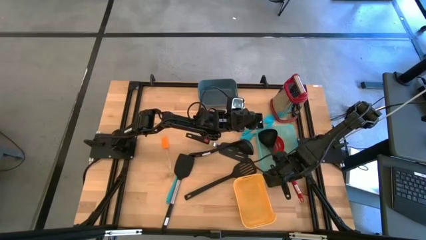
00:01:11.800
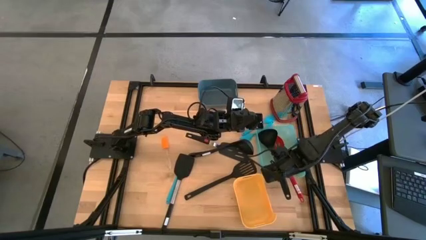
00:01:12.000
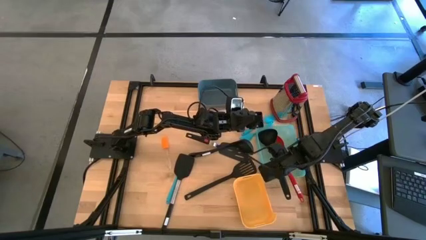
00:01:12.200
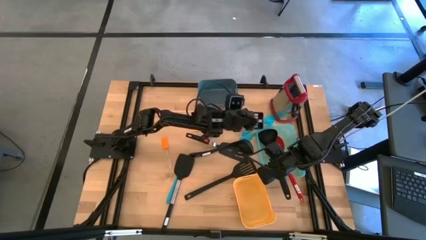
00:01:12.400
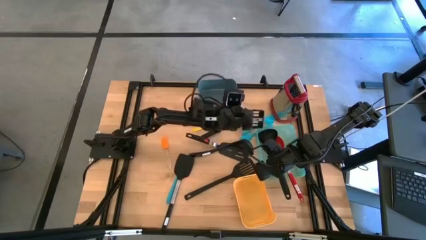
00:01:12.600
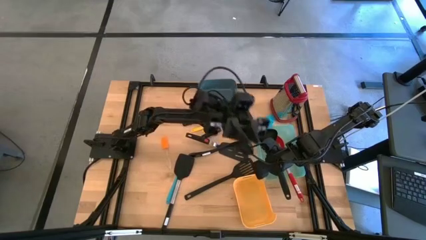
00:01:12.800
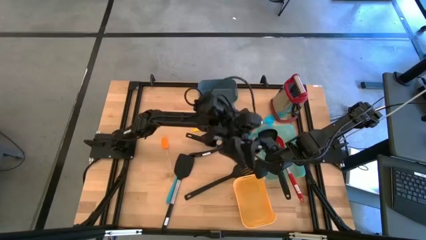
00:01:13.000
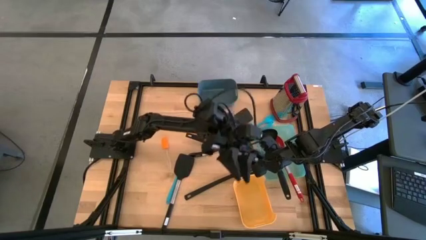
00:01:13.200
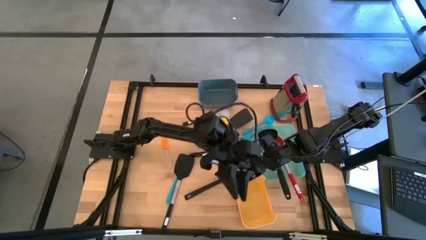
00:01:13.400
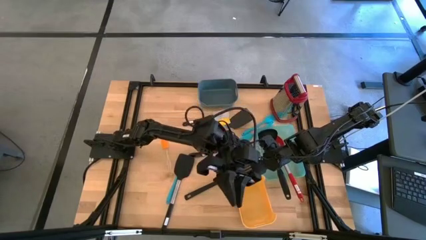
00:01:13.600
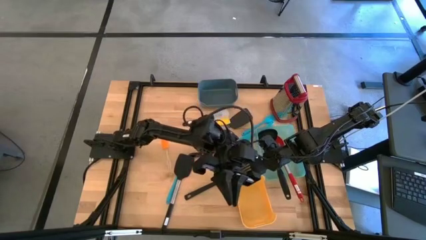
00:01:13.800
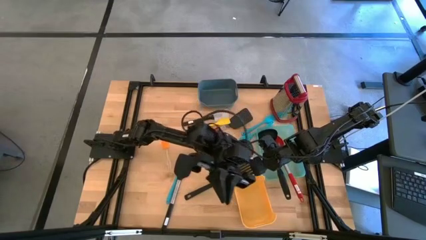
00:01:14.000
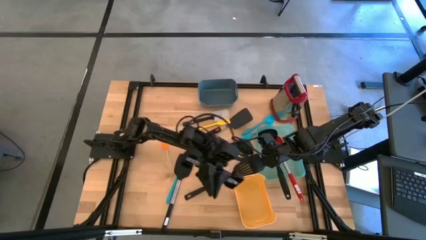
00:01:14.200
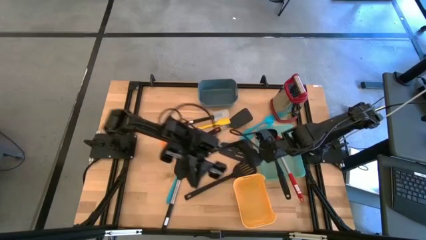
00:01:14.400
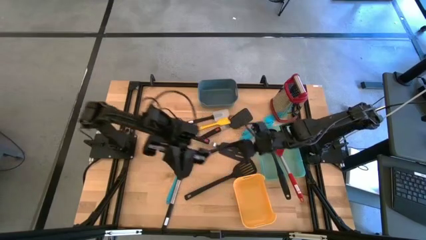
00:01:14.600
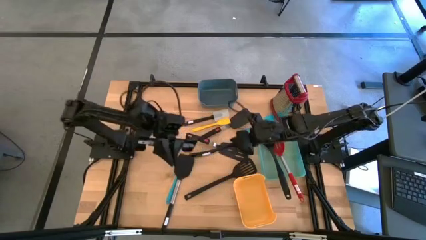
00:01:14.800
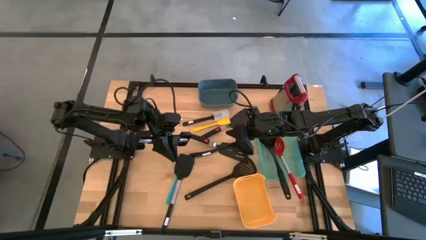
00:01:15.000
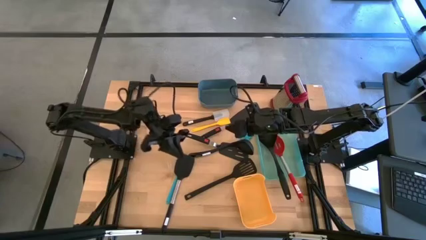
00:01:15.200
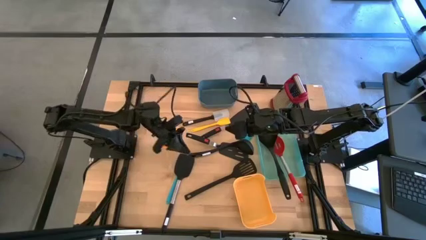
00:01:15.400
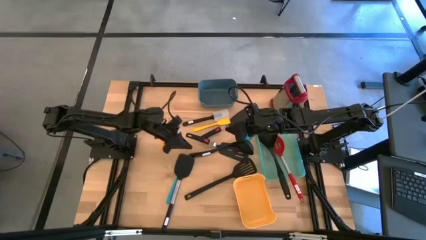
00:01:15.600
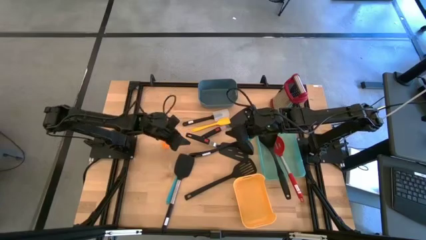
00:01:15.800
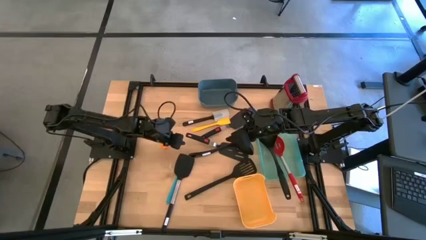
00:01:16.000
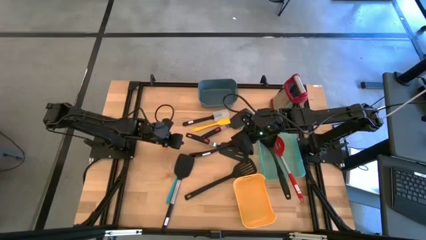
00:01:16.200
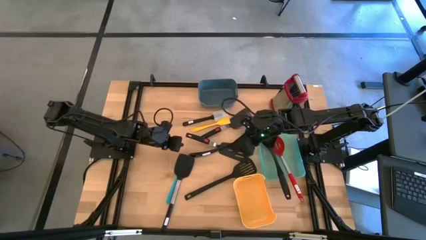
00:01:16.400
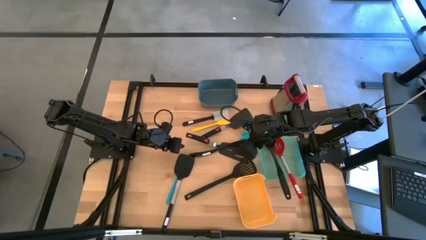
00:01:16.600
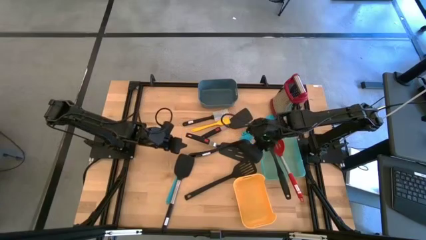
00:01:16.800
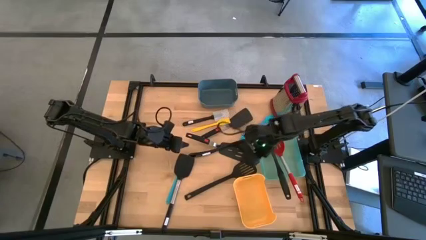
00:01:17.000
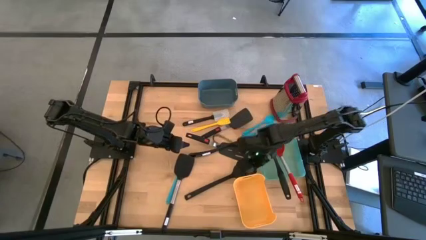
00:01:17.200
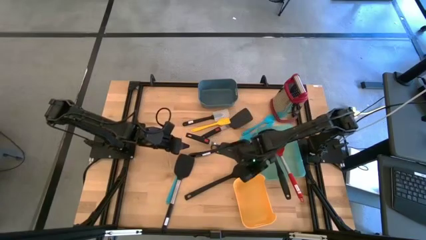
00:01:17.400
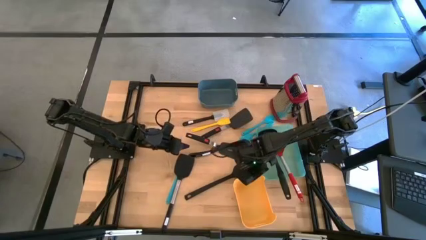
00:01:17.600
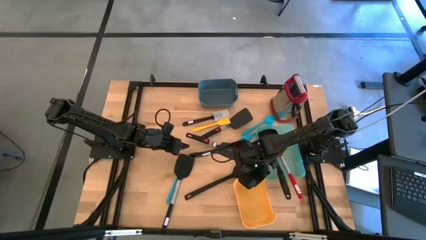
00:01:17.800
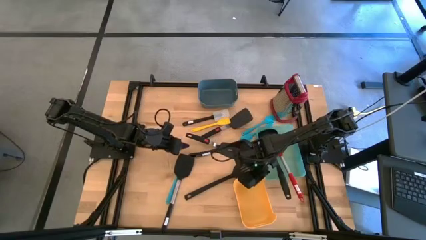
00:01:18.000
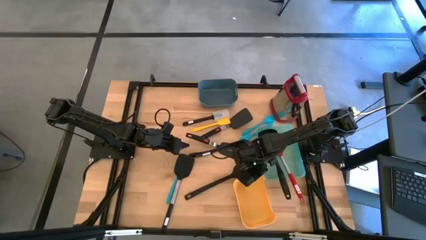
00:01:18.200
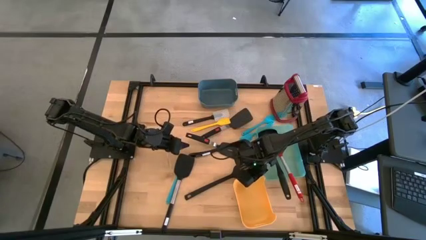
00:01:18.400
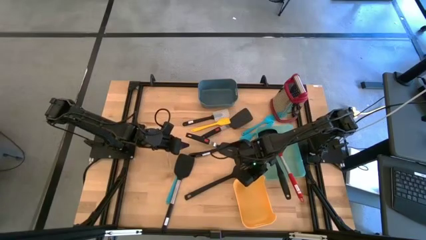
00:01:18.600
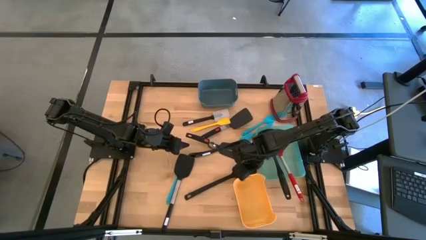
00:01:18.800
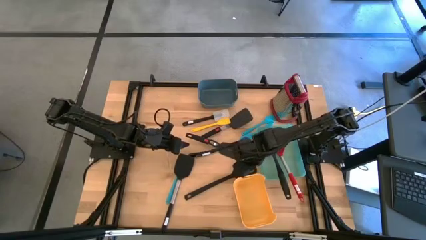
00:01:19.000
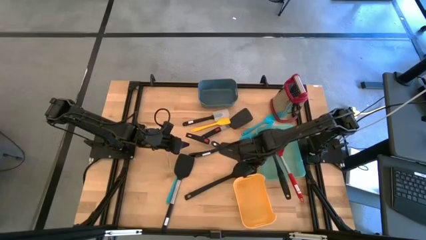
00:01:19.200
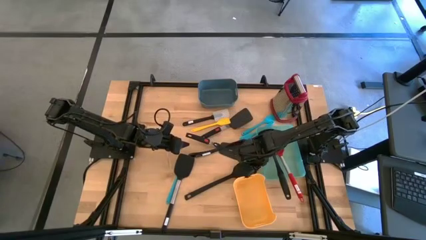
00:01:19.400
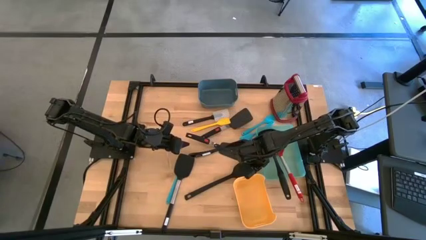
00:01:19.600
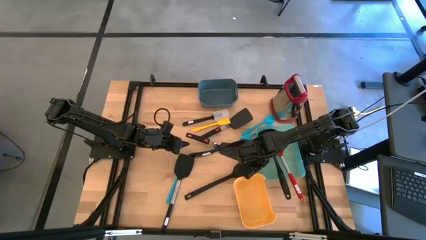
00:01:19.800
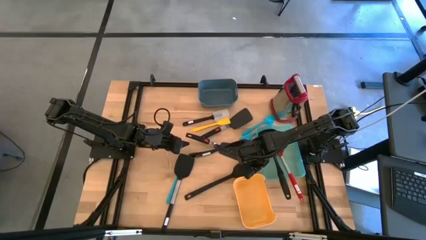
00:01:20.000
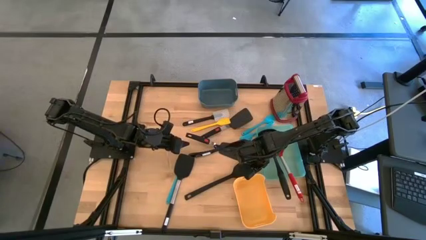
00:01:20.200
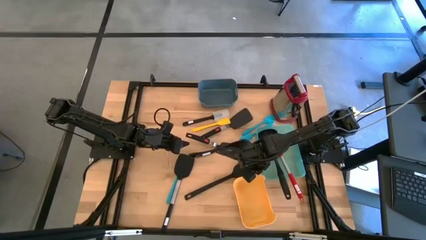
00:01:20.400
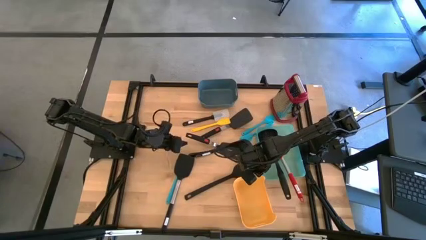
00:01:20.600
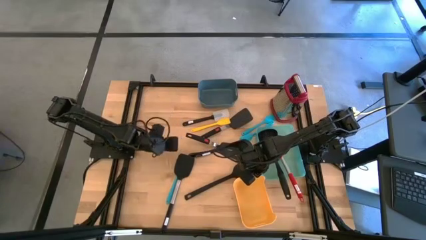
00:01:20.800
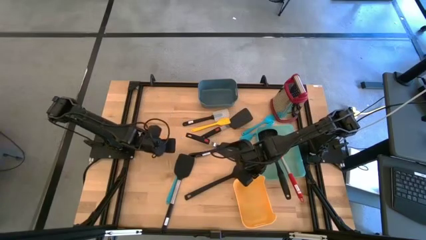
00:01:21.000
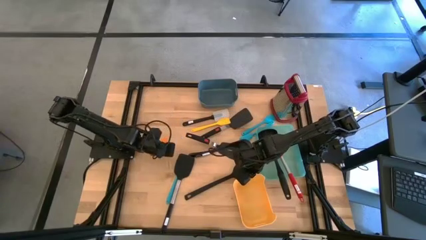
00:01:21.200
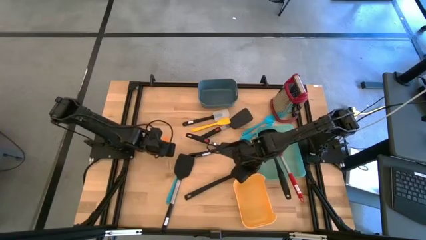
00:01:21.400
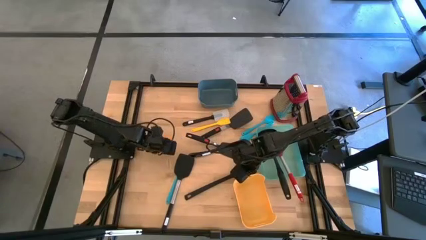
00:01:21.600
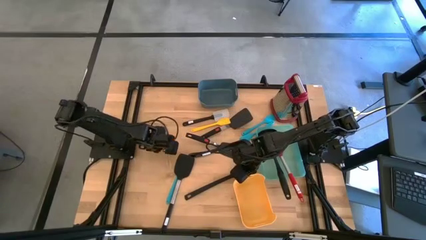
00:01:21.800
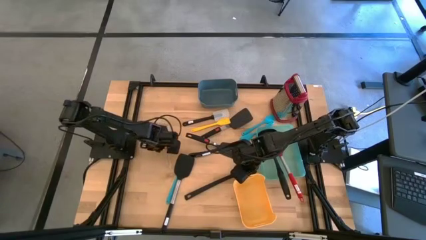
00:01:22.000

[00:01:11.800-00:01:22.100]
Task: Pick & Place Kitchen Items
Put the small orange spatula into the yellow bin
